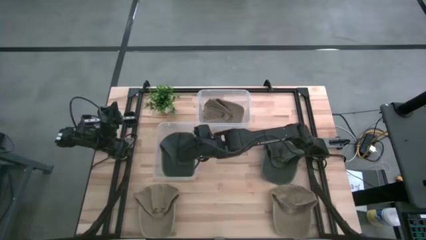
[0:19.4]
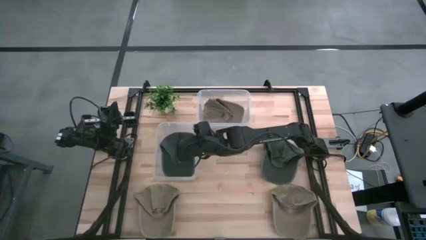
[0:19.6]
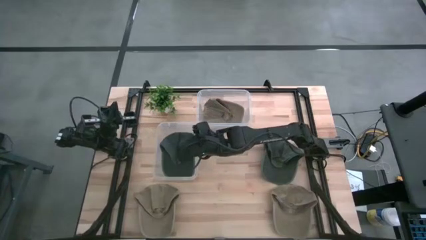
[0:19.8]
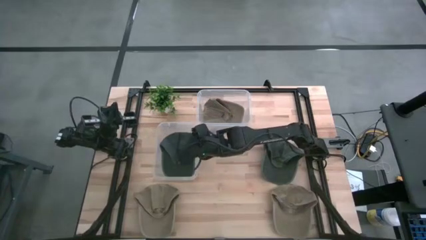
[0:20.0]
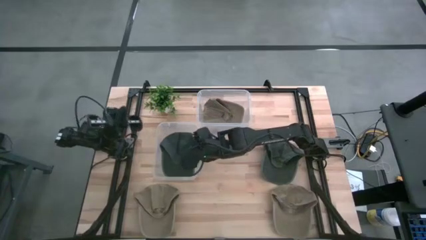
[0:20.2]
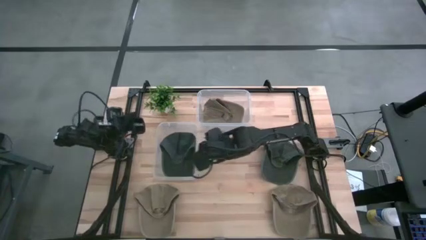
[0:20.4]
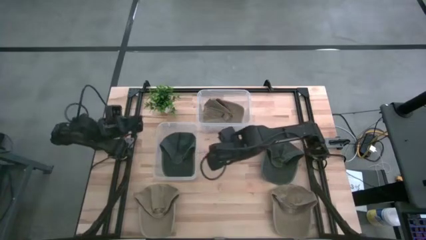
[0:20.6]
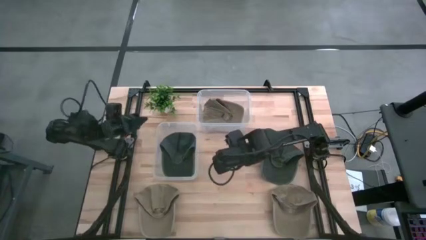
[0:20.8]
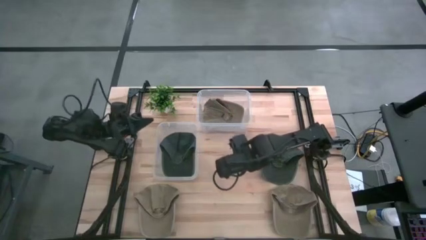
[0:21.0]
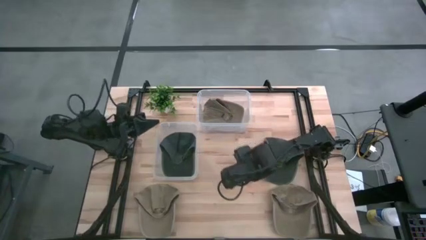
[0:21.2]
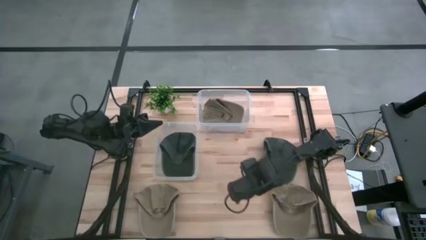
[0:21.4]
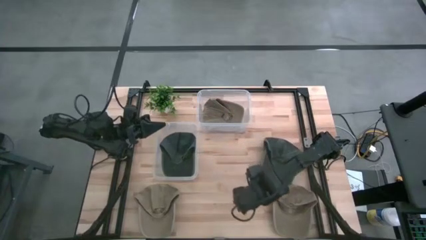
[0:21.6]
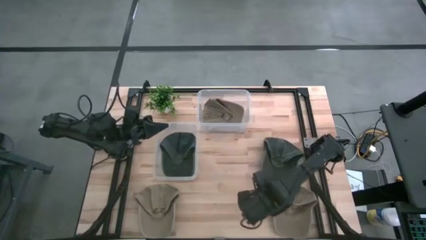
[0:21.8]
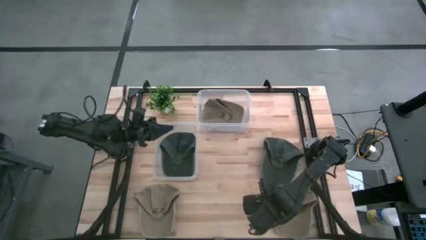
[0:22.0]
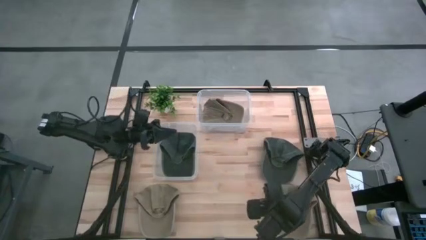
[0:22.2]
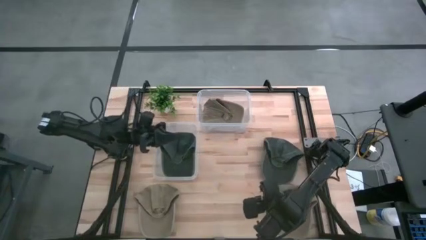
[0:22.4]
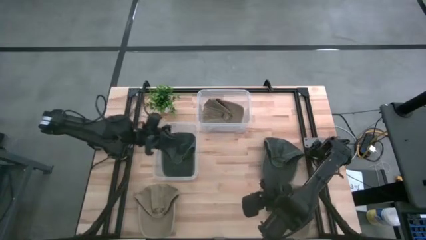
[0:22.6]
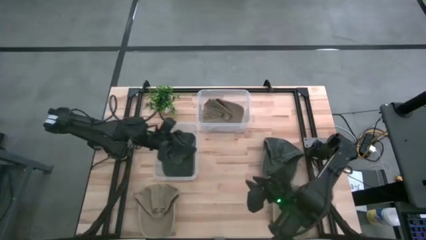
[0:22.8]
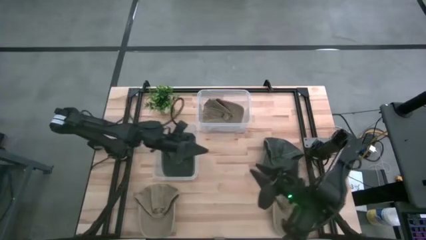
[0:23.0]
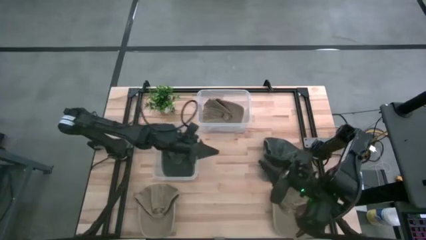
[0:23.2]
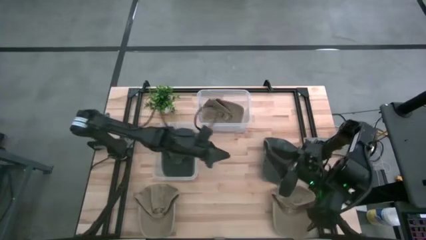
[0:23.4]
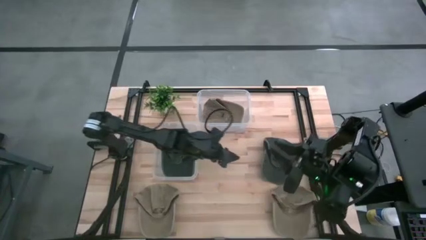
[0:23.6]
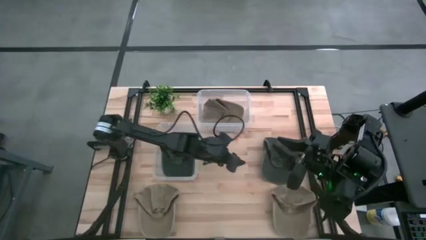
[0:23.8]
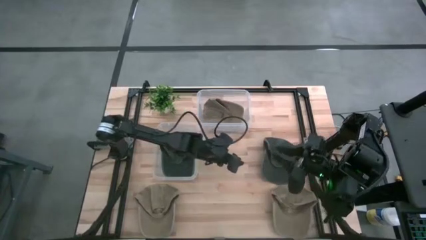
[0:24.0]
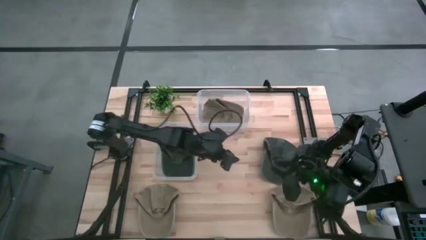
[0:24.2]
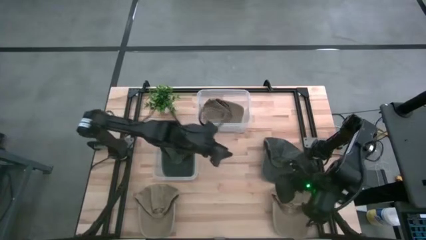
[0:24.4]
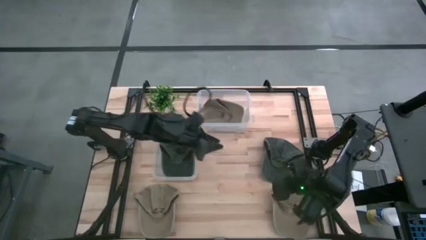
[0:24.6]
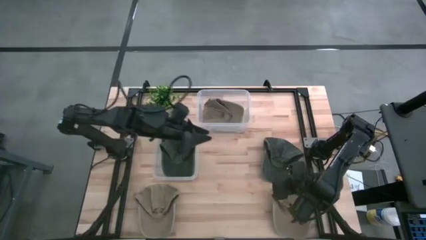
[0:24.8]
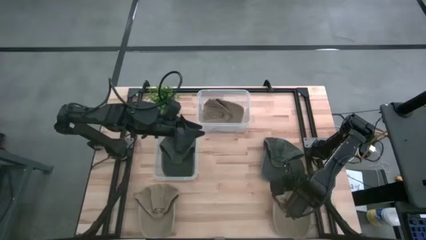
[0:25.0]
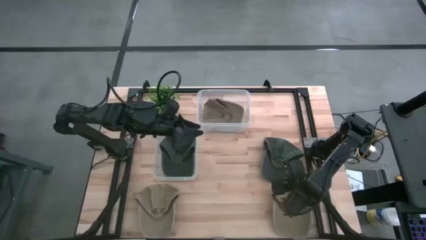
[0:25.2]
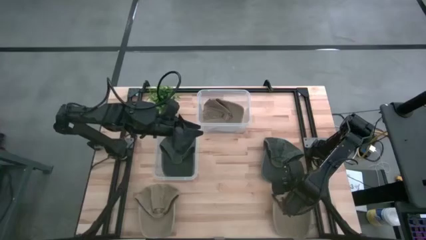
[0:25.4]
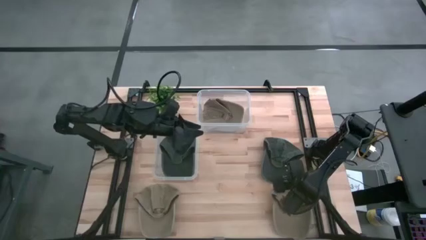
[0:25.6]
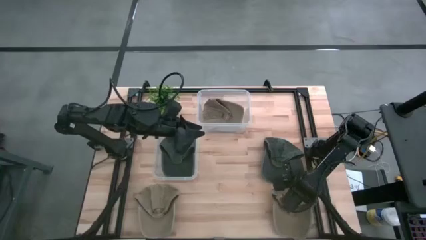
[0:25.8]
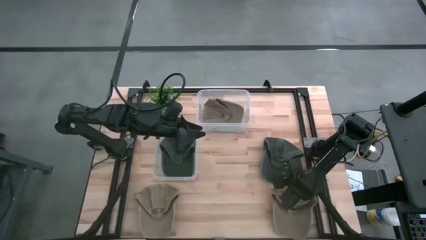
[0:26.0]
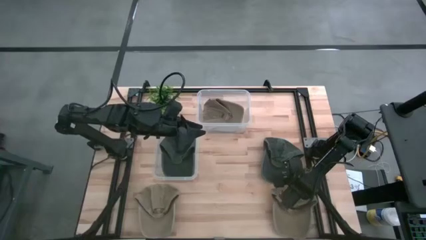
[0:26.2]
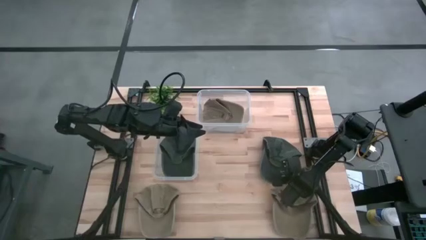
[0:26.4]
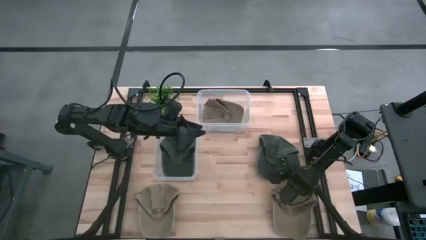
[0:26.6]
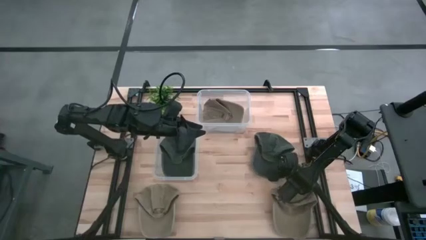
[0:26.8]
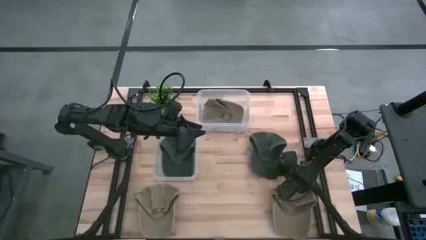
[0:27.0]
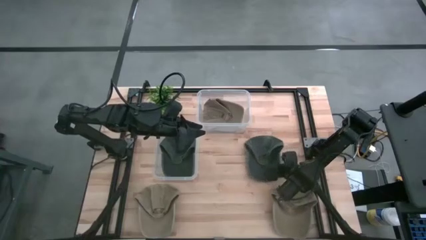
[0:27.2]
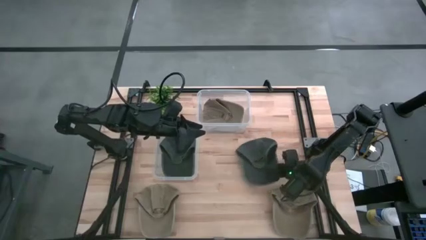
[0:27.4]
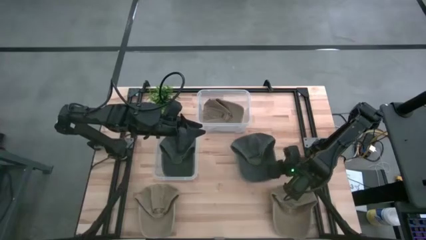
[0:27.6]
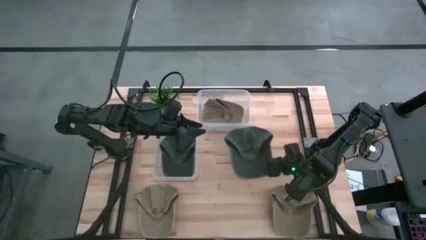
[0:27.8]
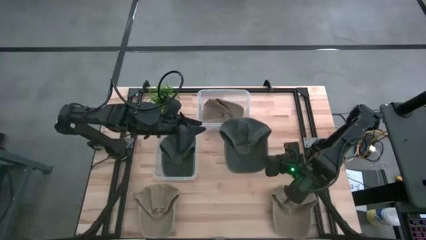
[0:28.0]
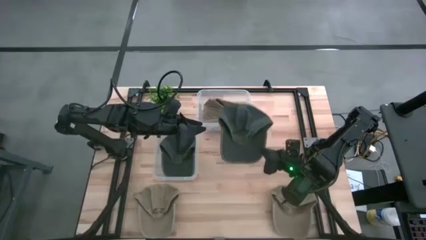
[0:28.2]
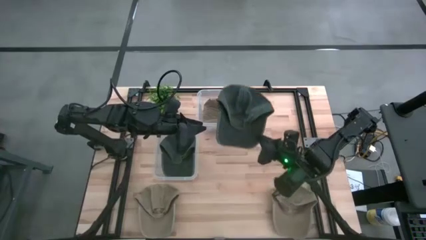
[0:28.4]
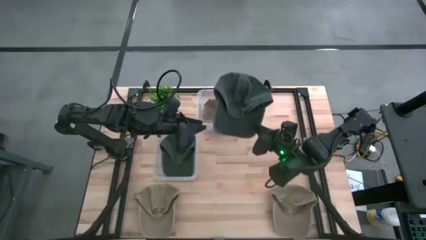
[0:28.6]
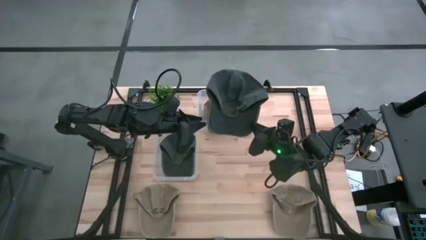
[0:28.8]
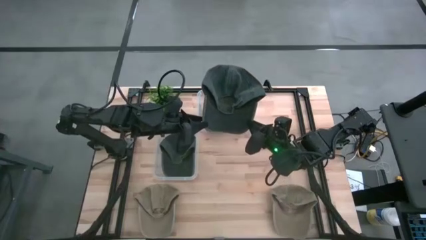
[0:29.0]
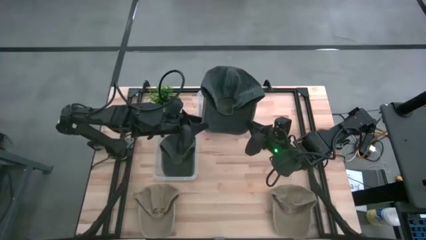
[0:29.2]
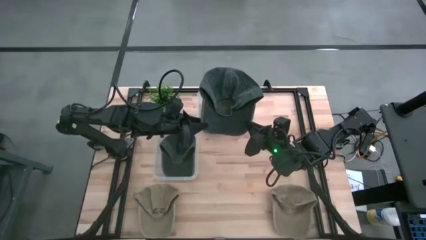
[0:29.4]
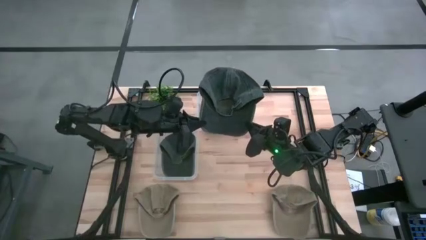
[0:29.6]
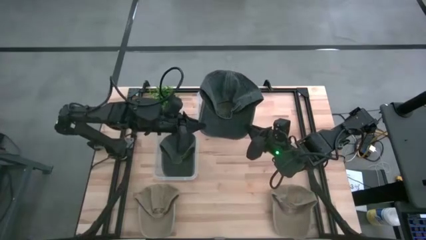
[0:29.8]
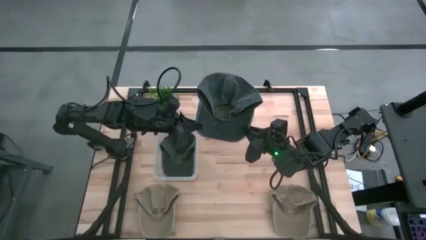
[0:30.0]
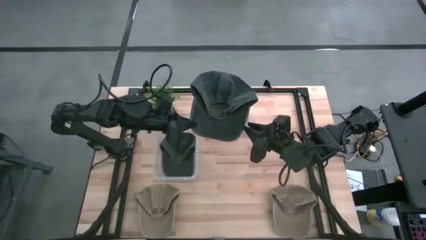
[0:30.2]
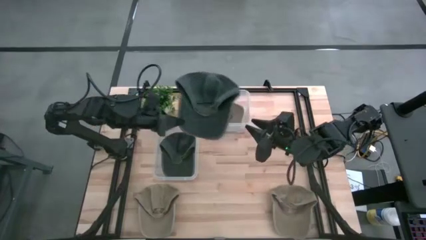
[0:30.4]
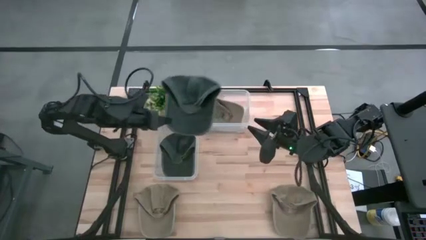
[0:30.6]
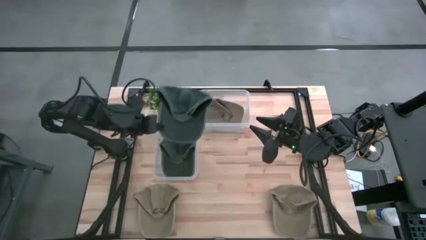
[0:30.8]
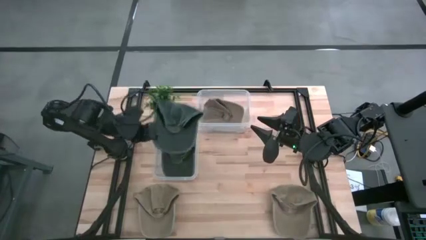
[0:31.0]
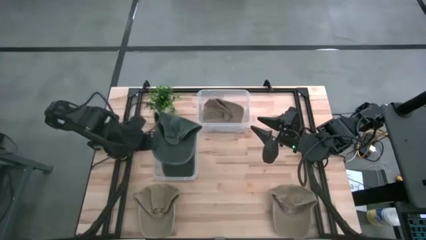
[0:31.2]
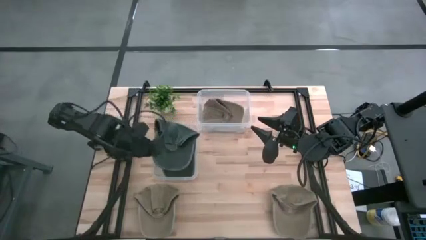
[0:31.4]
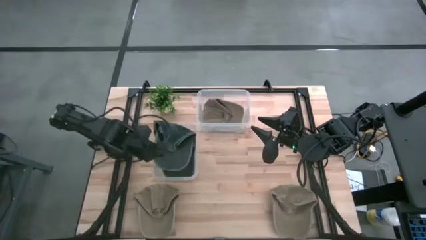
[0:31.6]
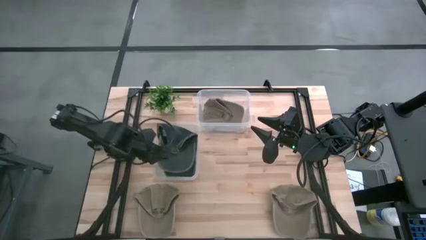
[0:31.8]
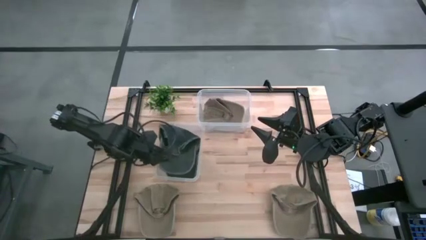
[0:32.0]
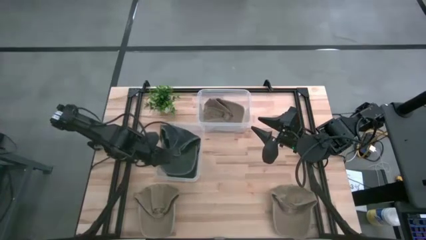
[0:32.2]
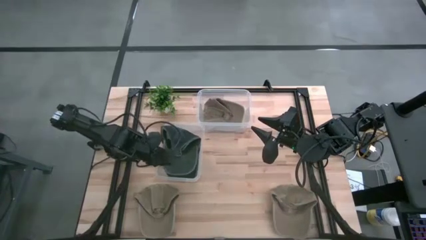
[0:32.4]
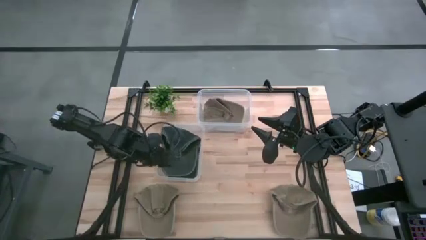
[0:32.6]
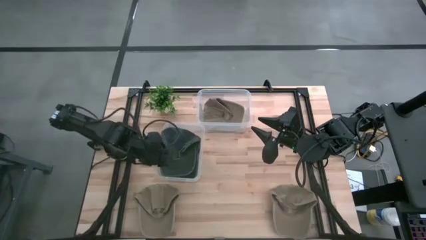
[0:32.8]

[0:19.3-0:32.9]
Task: Pick & Place hat
Put the blue cap into the bottom transparent bin
